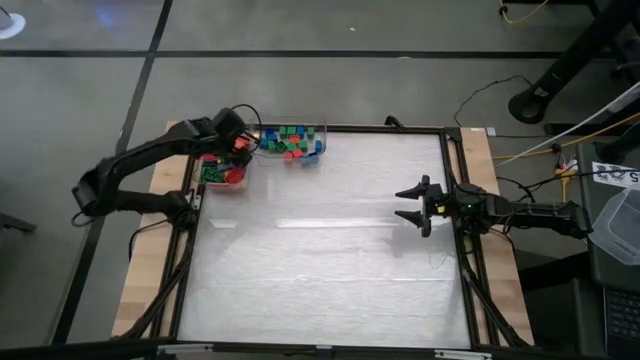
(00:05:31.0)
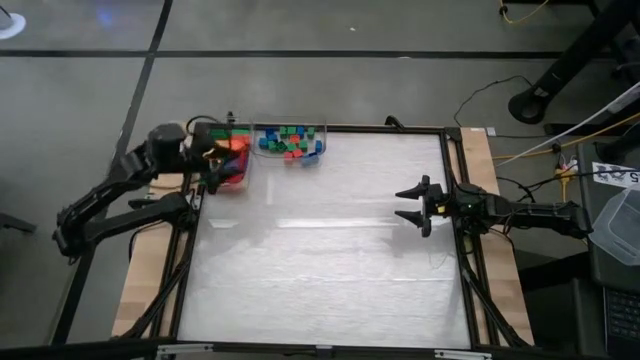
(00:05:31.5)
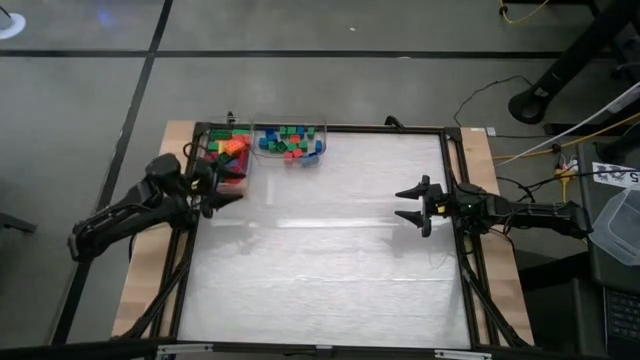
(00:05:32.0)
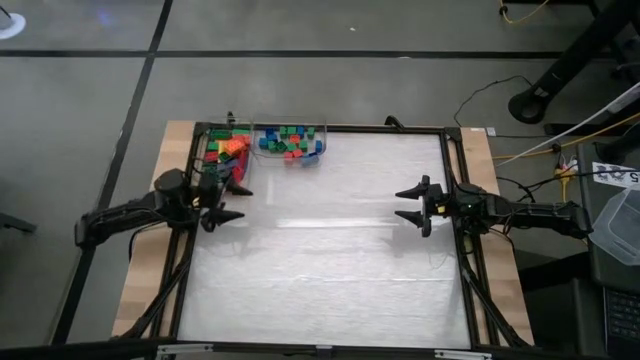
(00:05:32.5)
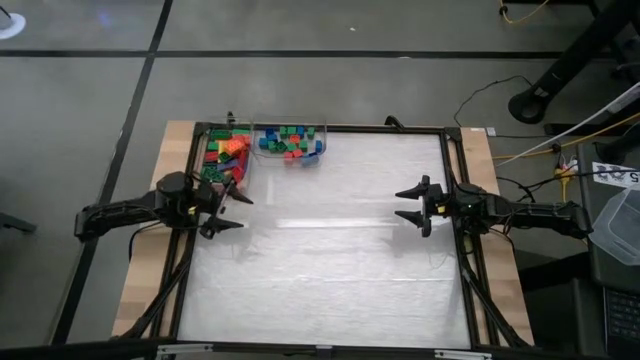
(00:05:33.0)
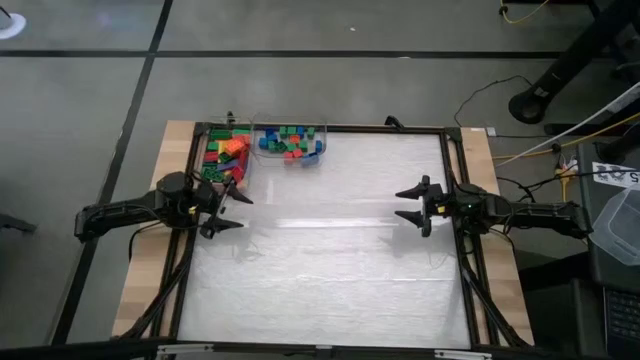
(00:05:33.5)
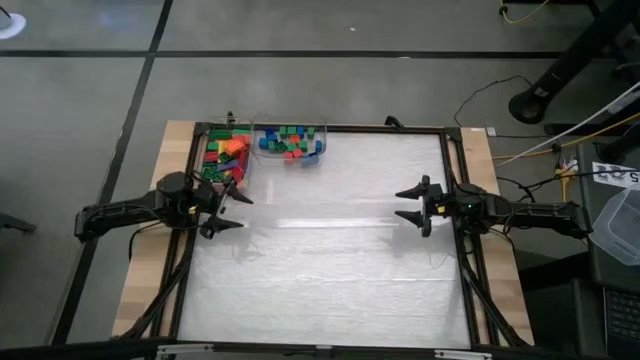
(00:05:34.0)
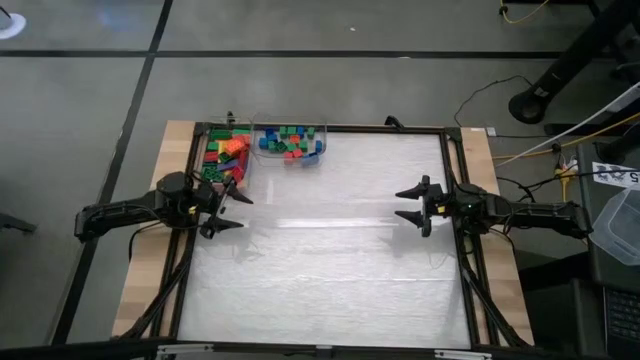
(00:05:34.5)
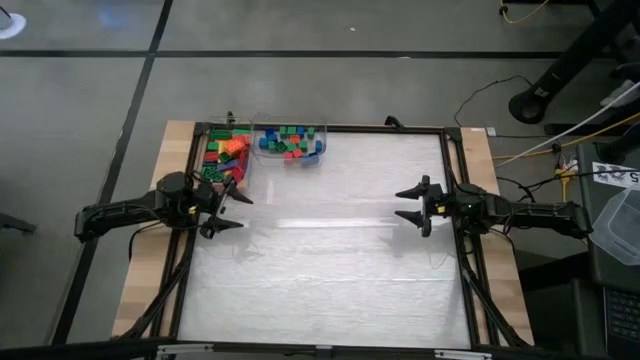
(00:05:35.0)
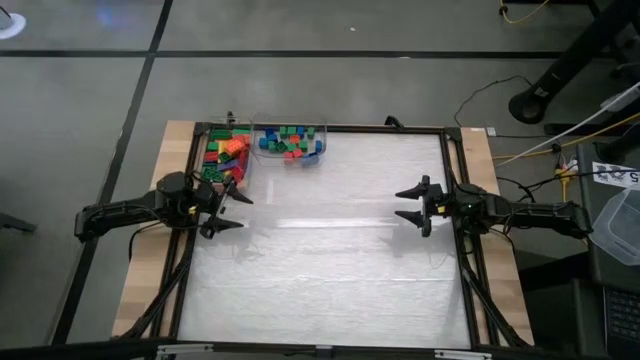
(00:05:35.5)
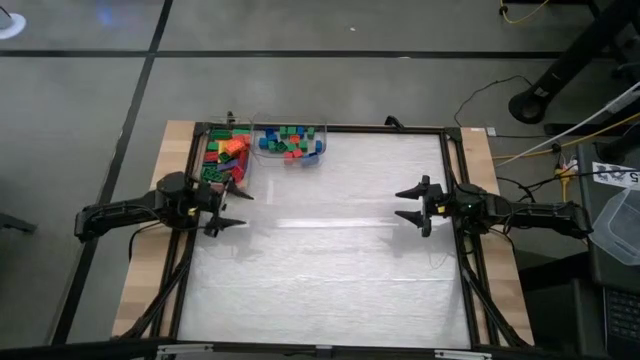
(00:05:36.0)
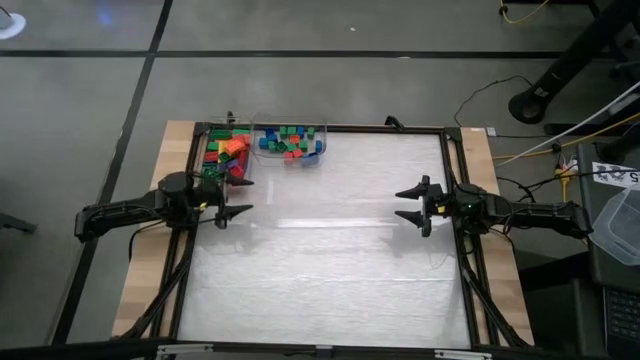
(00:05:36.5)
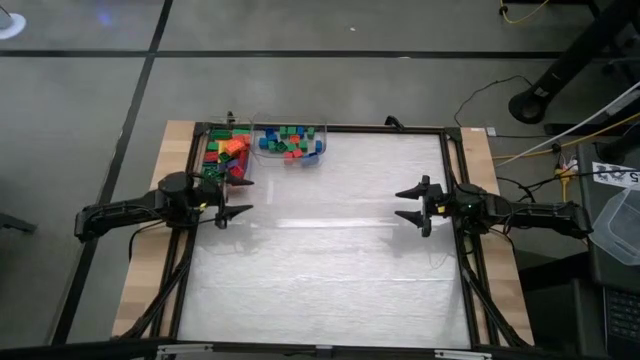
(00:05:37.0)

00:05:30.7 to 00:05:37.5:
Task: Sort blocks by size
Return to Home Position

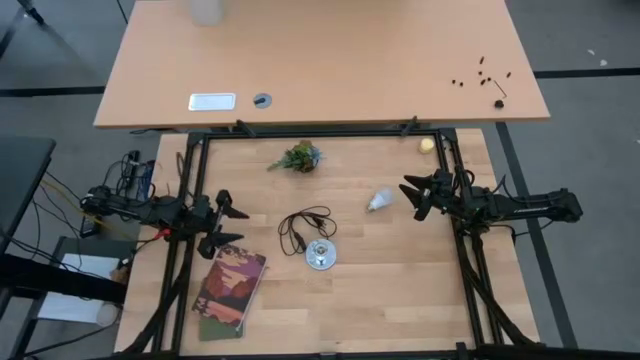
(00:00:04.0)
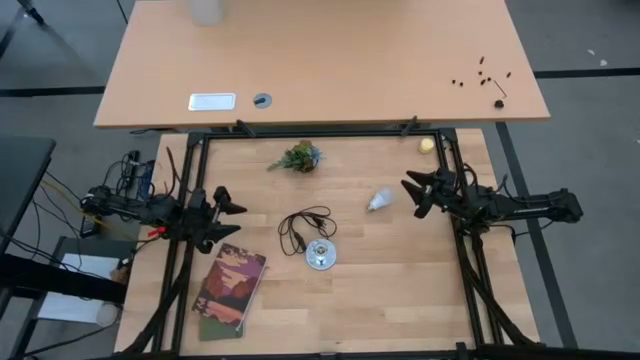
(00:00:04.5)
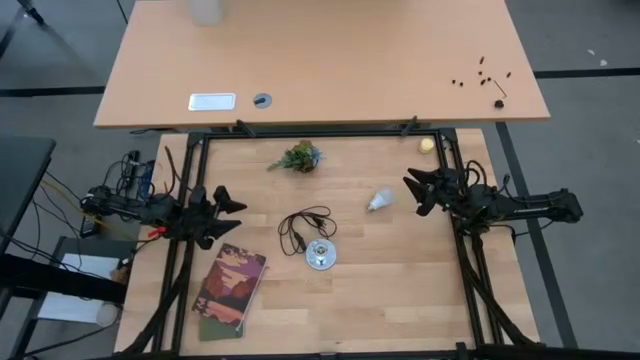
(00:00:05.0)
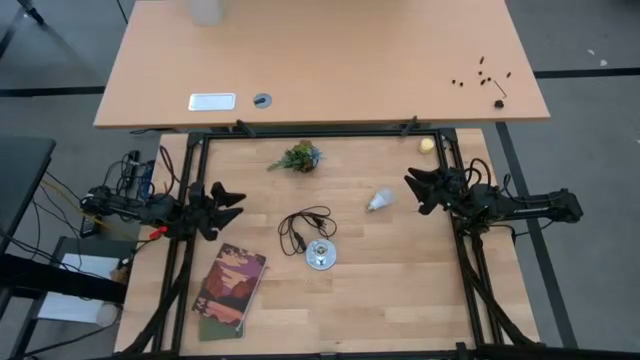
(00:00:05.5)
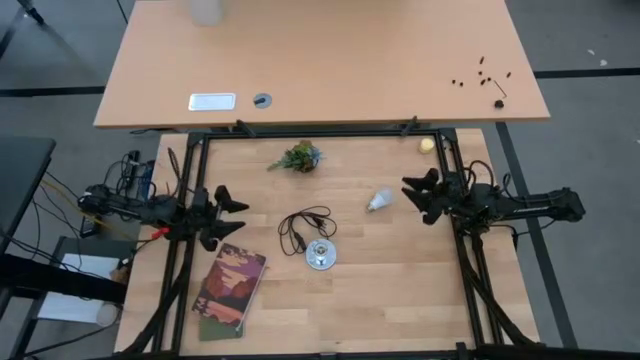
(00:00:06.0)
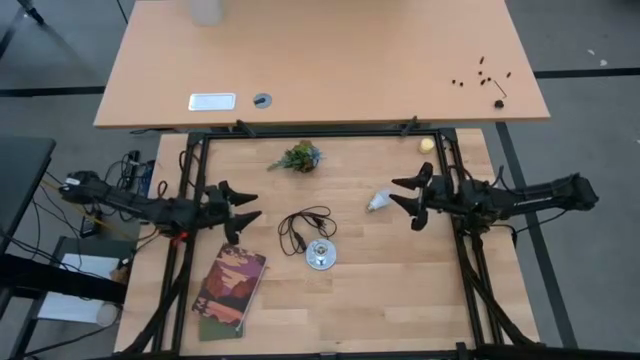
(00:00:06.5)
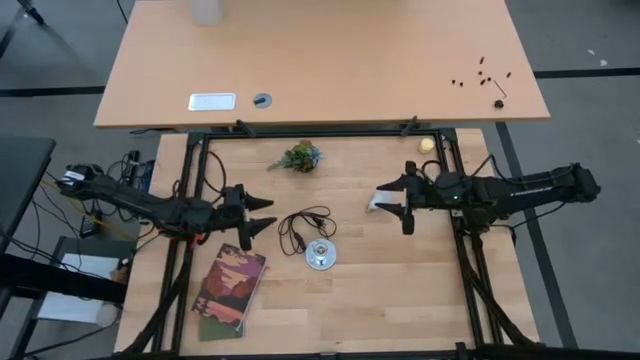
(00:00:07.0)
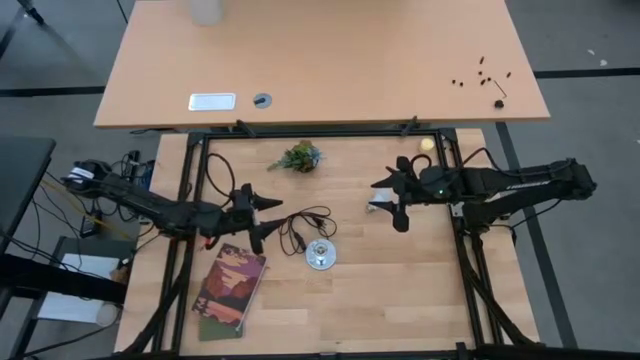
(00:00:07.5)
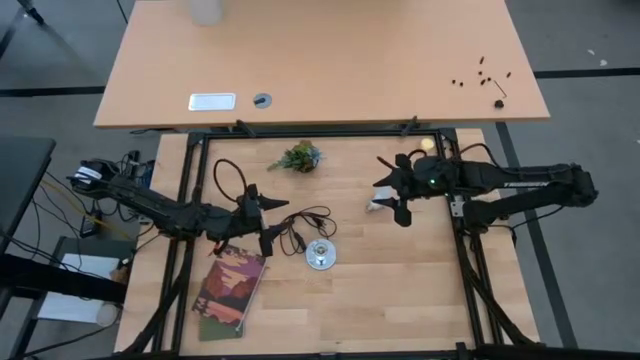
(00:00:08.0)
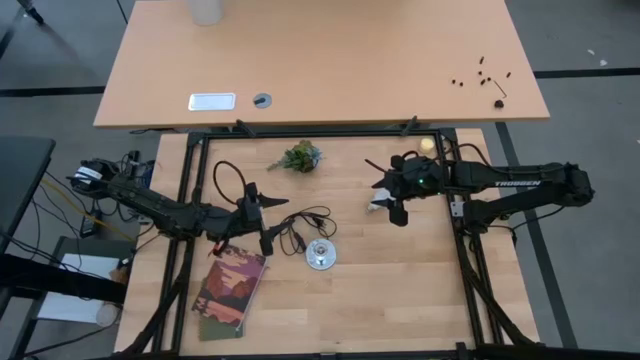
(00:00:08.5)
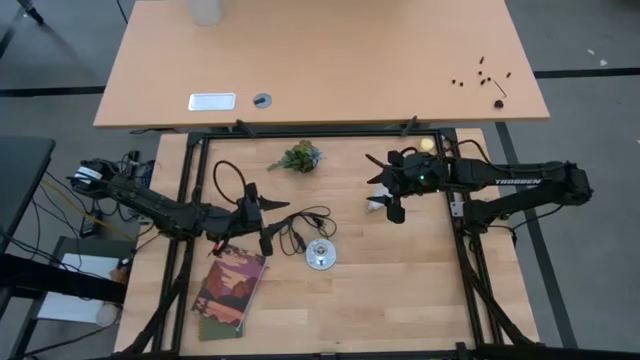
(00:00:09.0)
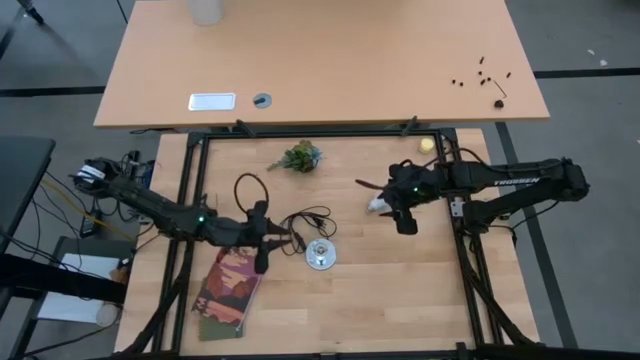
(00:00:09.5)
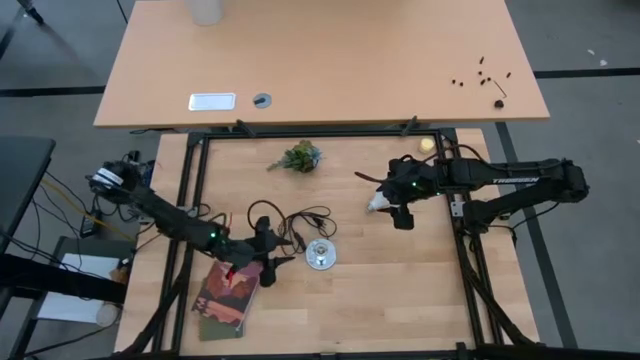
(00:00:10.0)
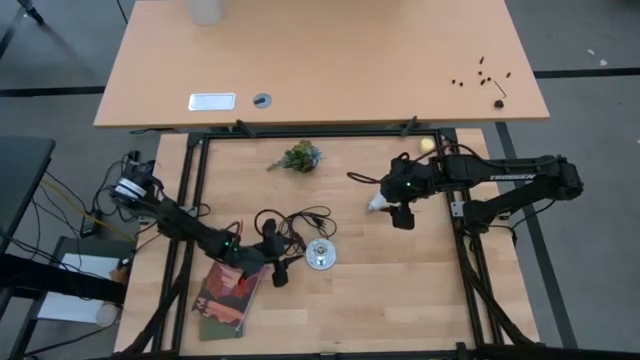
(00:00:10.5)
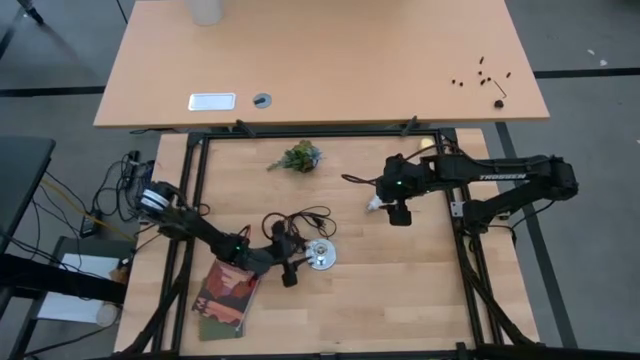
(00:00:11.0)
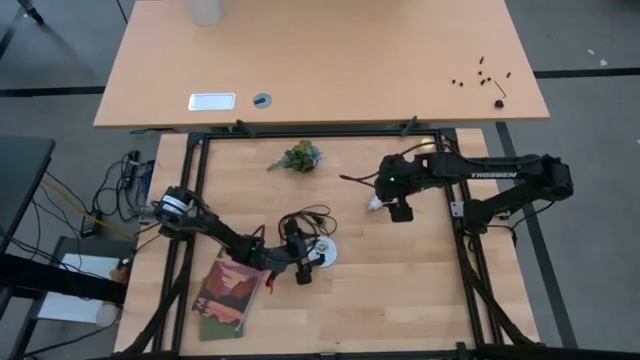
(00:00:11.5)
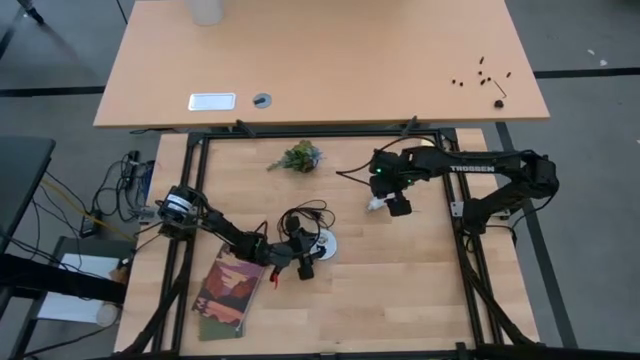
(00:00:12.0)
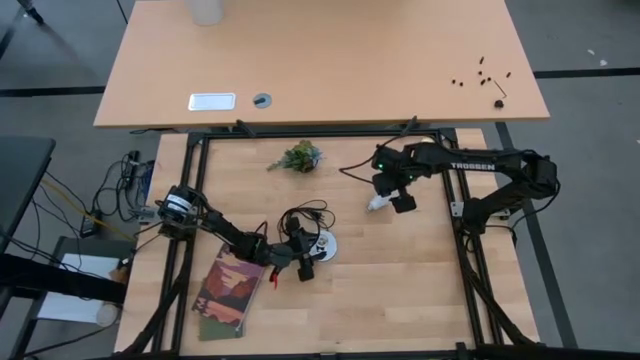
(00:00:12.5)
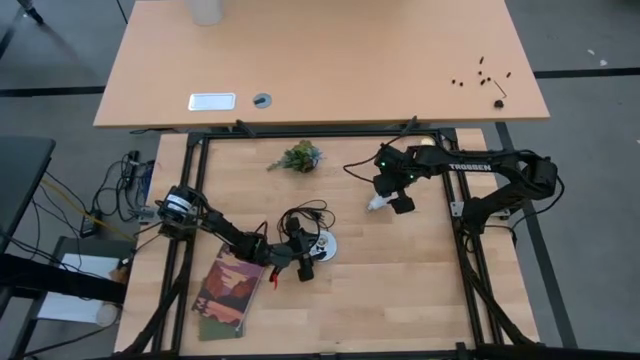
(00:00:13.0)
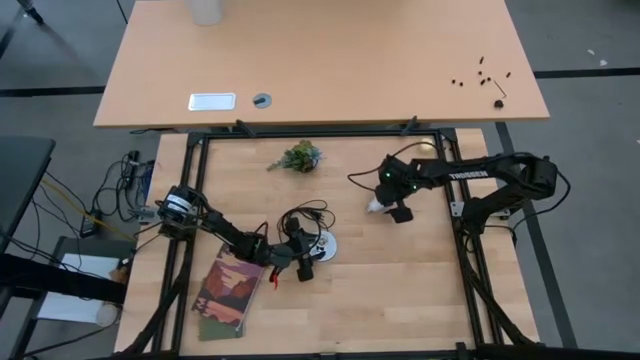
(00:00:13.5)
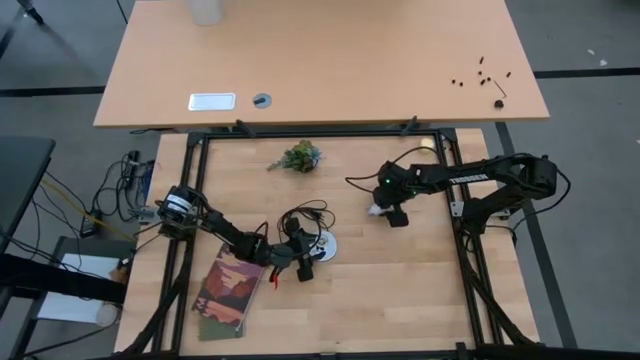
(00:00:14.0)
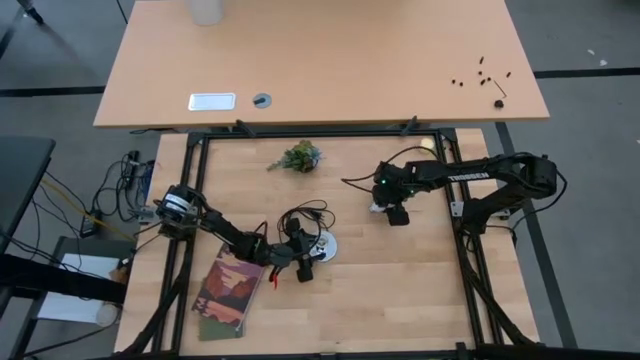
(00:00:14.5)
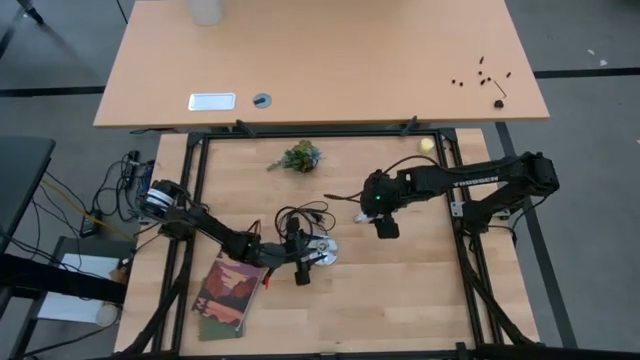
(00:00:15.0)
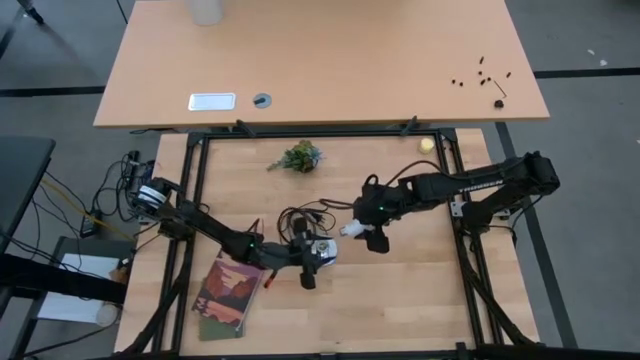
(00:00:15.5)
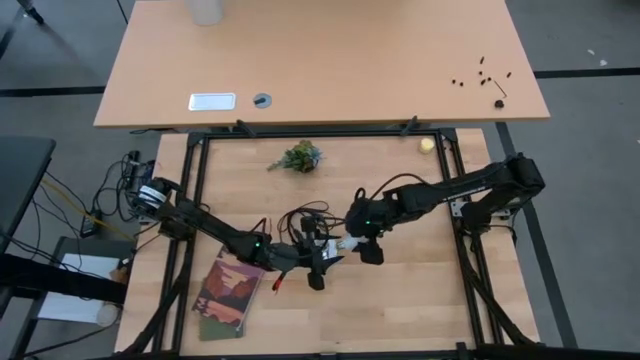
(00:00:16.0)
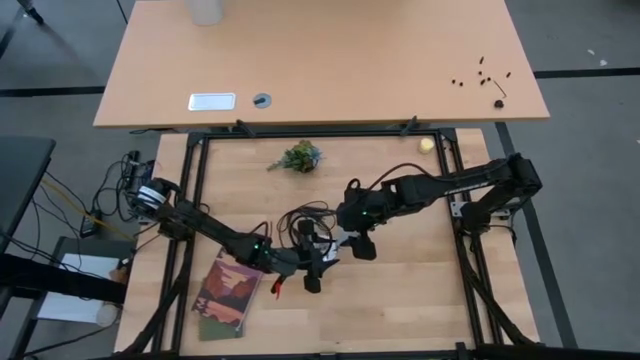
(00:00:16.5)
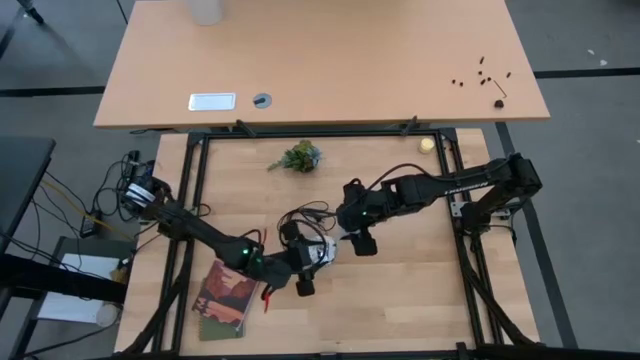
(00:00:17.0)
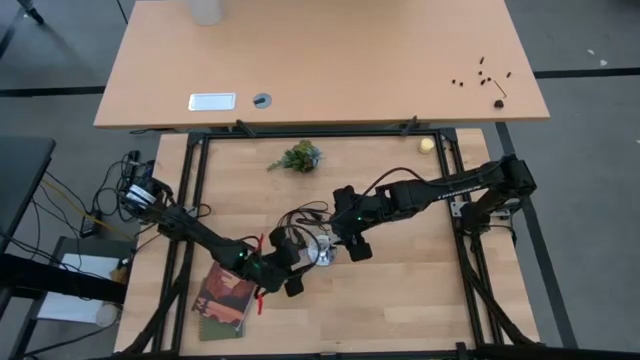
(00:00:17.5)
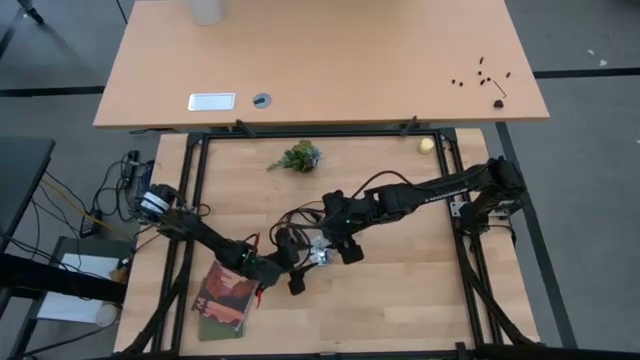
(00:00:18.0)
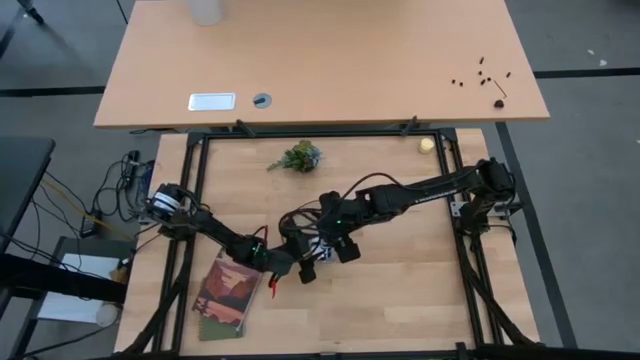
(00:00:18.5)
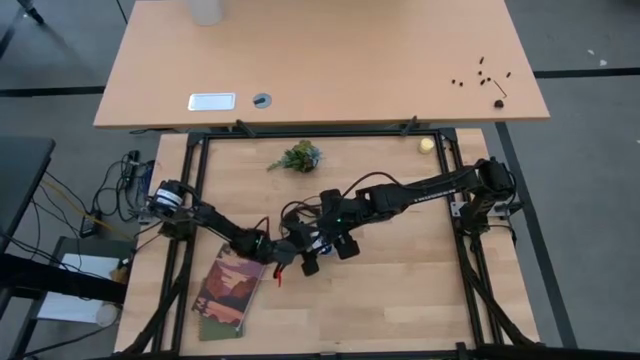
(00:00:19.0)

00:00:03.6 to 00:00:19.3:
Task: Screw lightbulb
Insert the white lightbulb into the lamp socket
